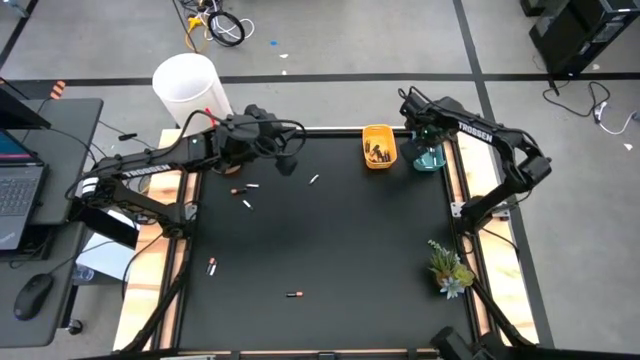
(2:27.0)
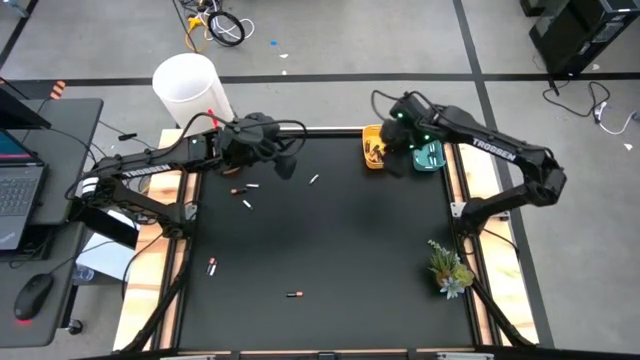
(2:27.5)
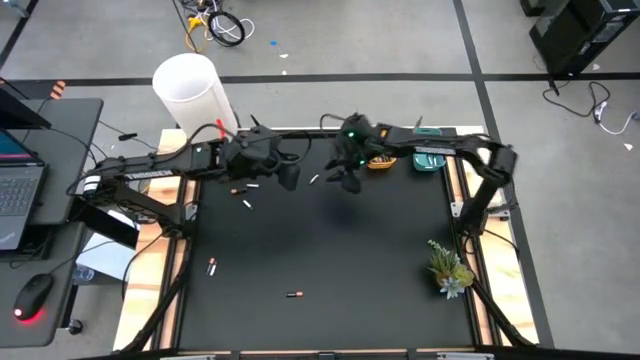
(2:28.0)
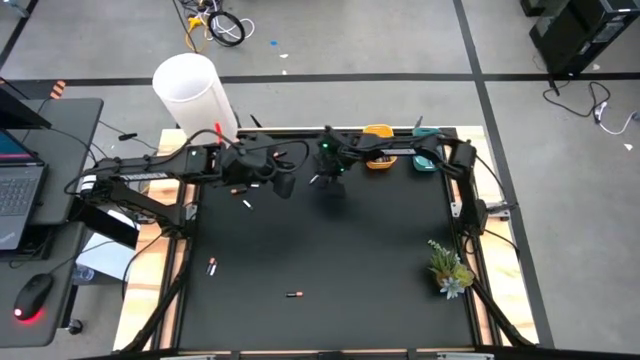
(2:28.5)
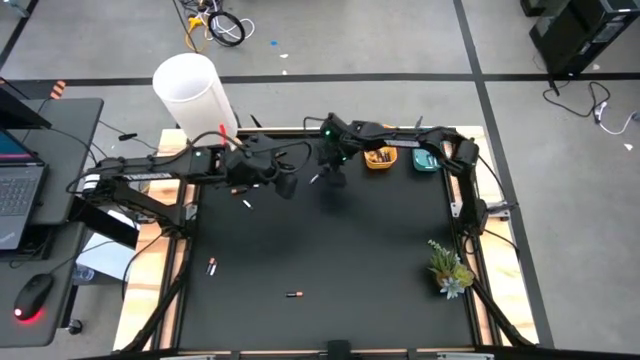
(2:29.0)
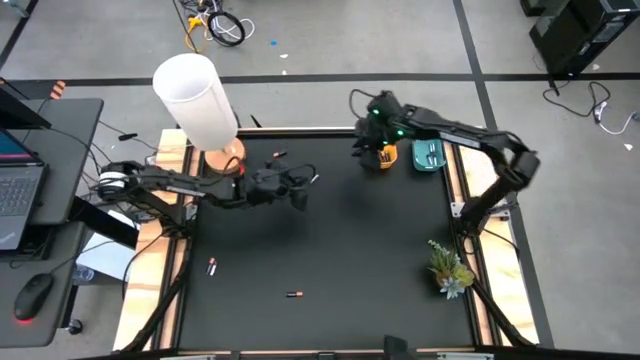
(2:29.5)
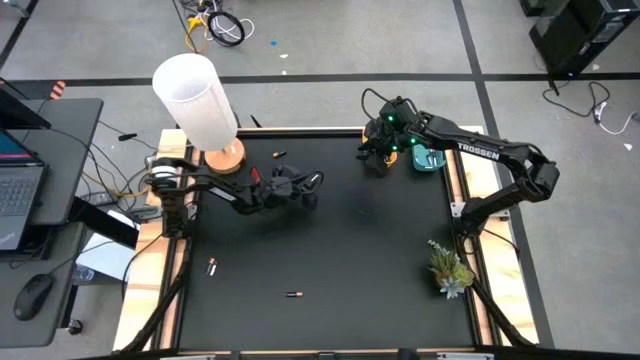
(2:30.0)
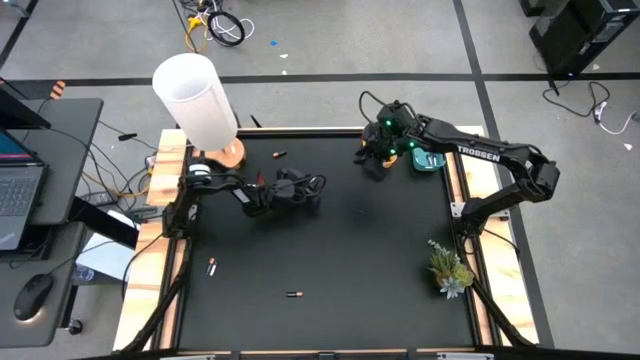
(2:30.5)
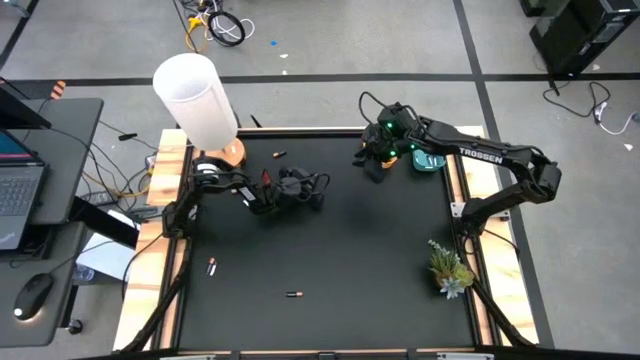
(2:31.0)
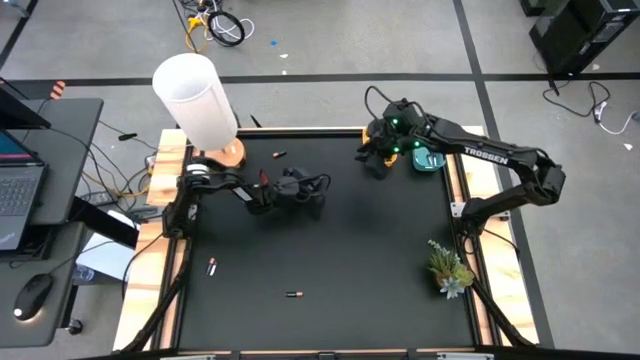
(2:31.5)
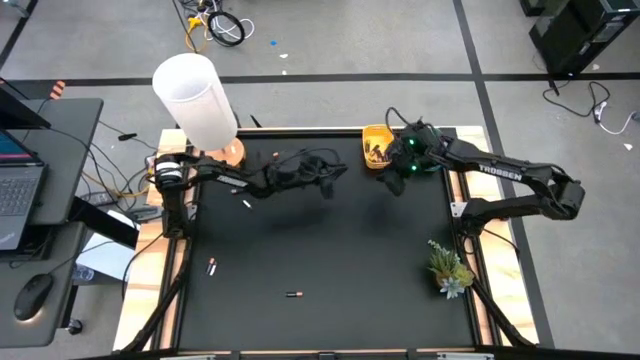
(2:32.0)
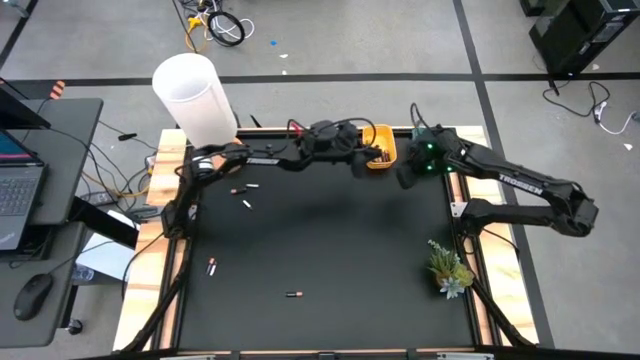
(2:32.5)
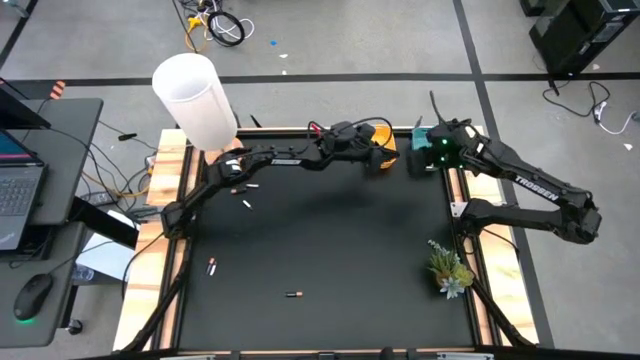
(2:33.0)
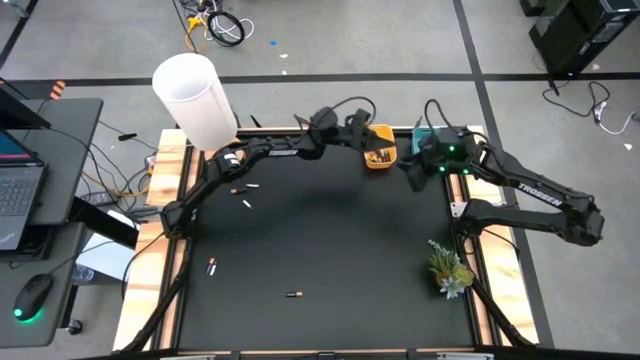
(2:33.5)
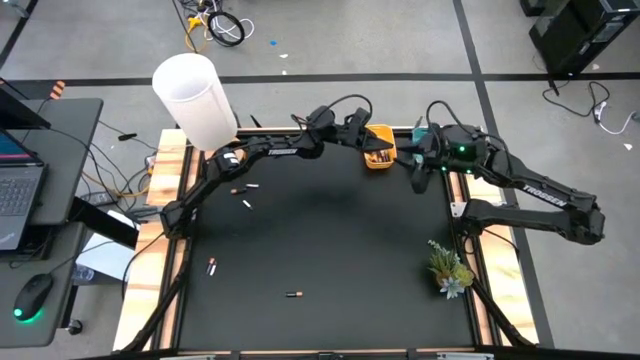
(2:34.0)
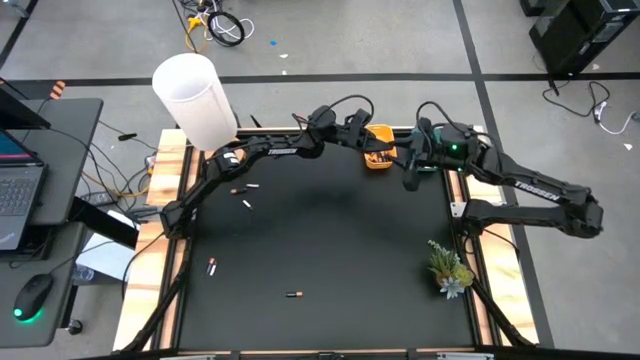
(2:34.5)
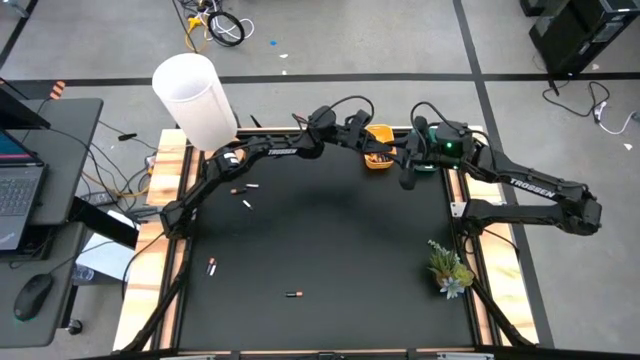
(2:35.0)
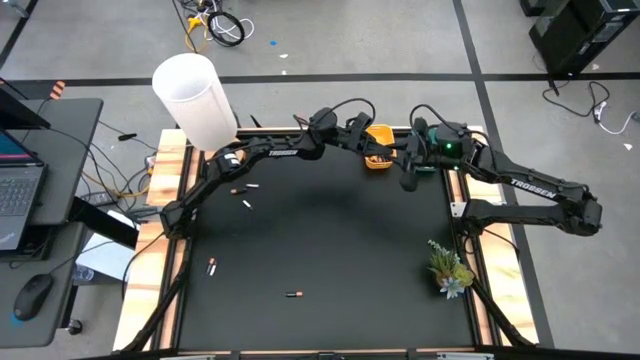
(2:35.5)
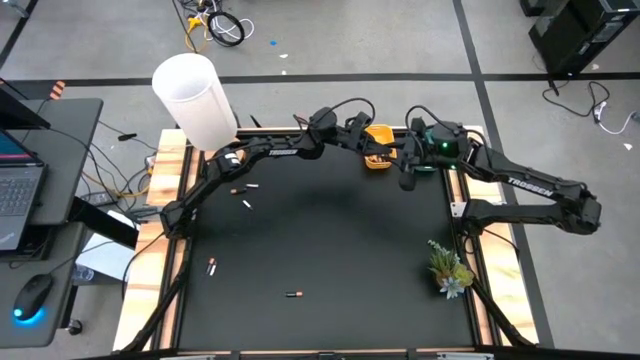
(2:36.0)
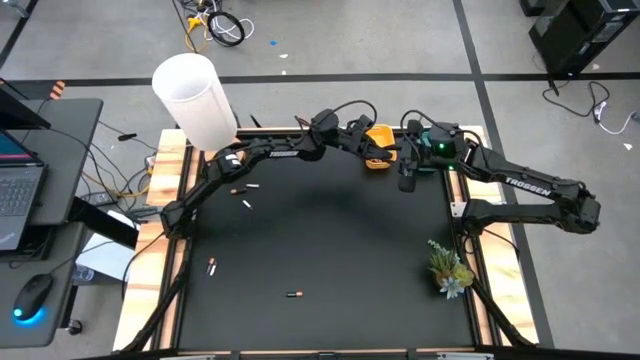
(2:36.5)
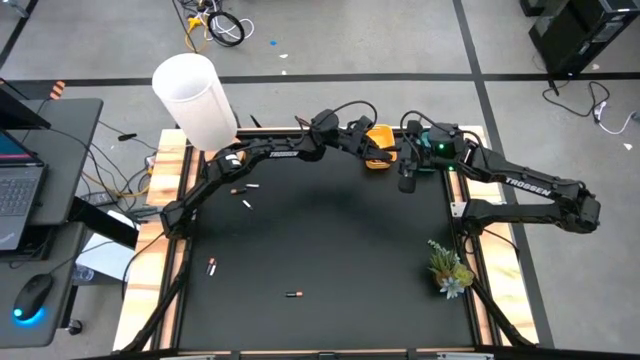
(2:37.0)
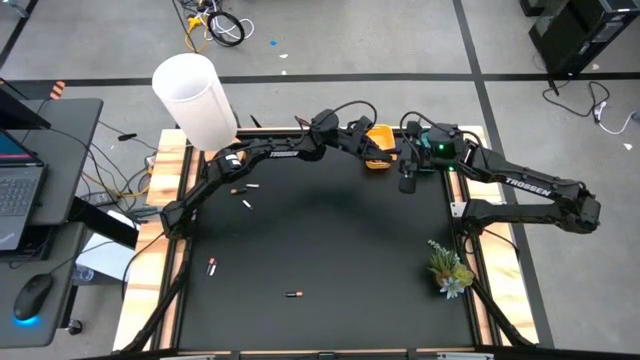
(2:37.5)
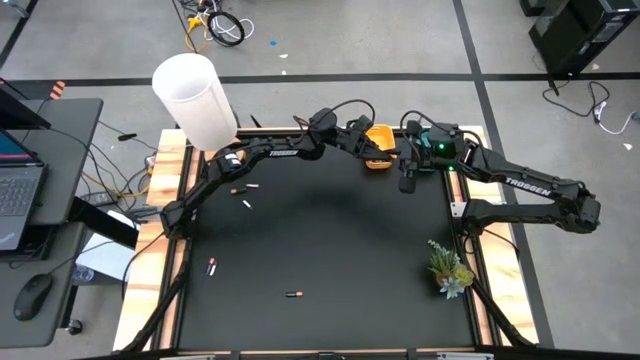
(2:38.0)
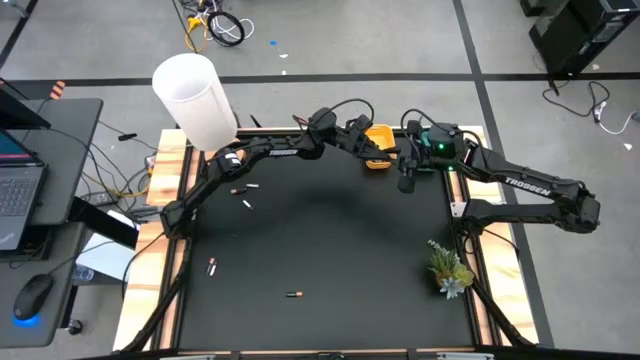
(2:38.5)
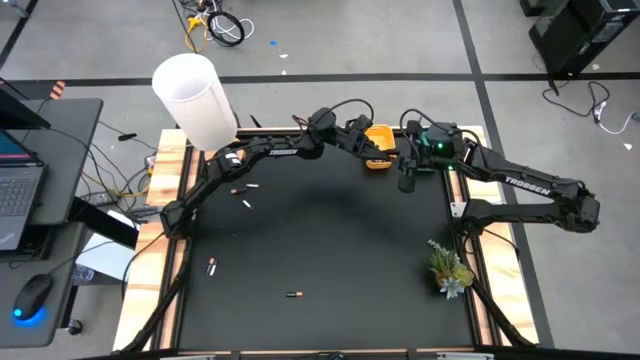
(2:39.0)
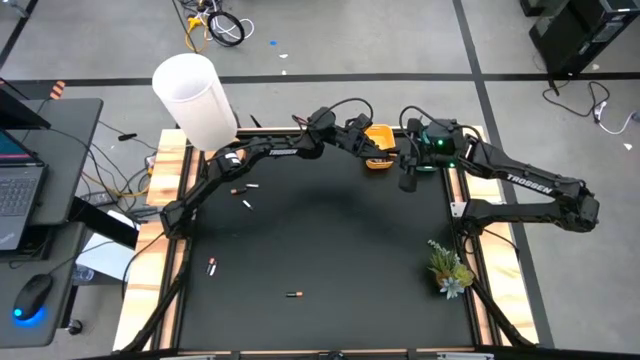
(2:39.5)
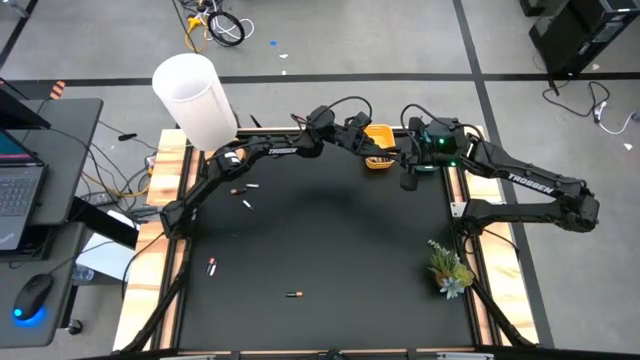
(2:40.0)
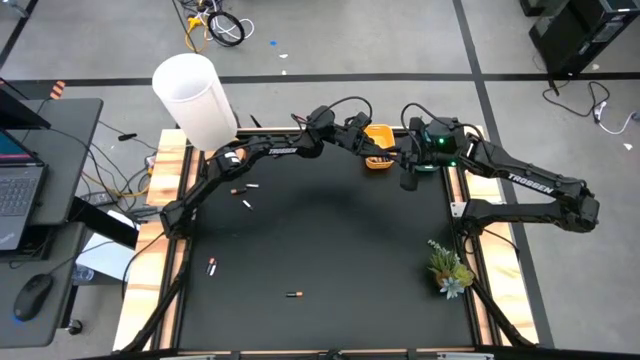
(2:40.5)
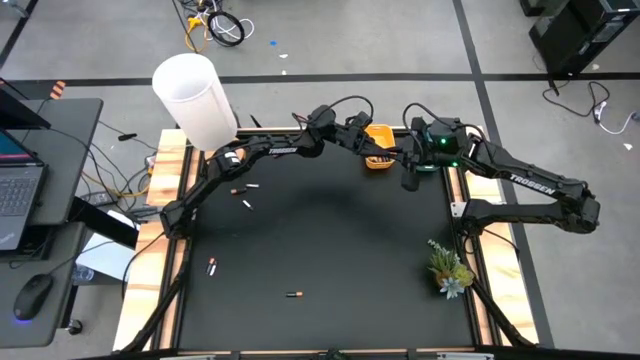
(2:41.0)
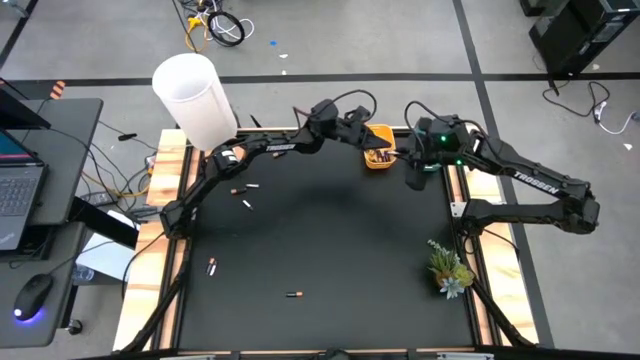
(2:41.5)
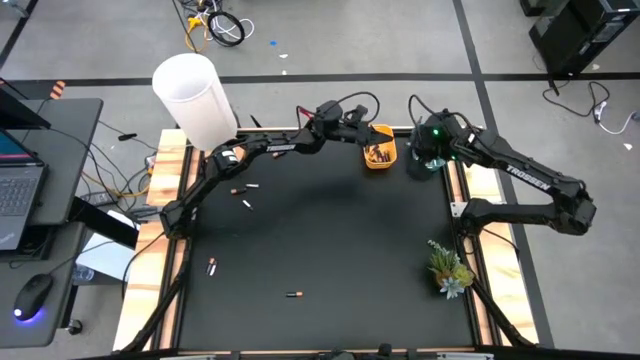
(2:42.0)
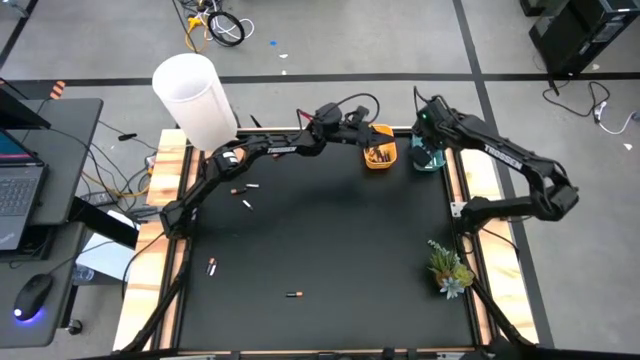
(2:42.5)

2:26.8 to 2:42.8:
Task: Sort batteries
Put the silver battery into the blue bin

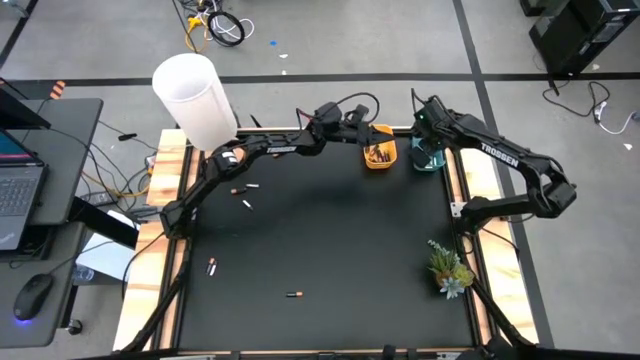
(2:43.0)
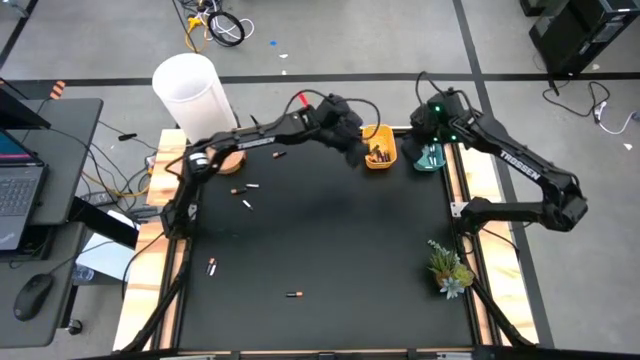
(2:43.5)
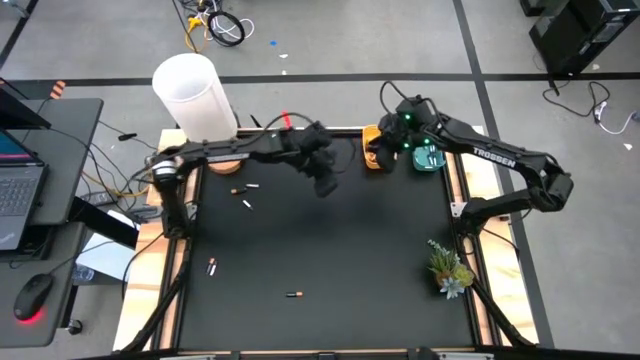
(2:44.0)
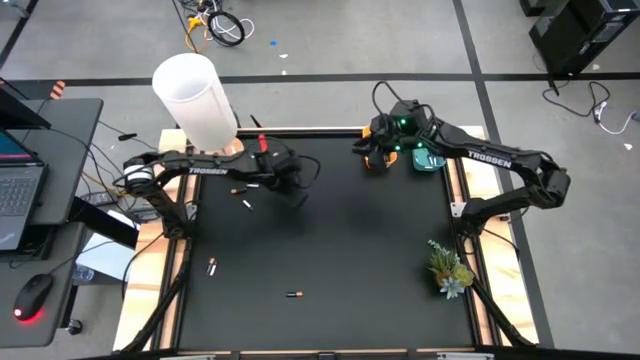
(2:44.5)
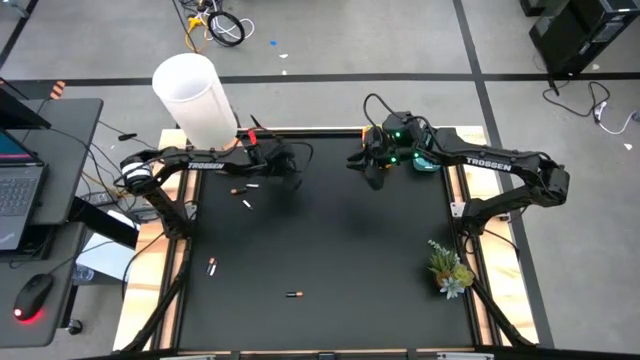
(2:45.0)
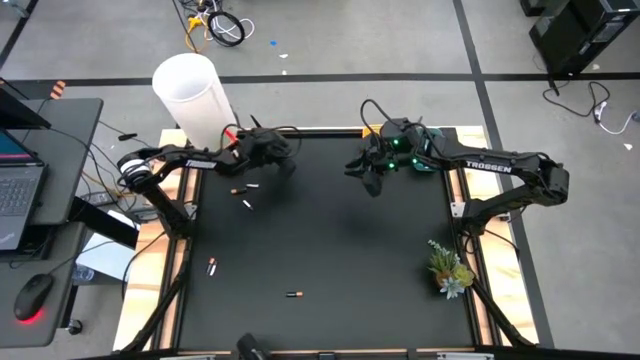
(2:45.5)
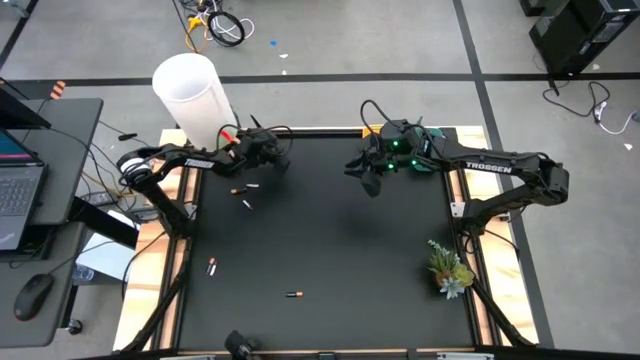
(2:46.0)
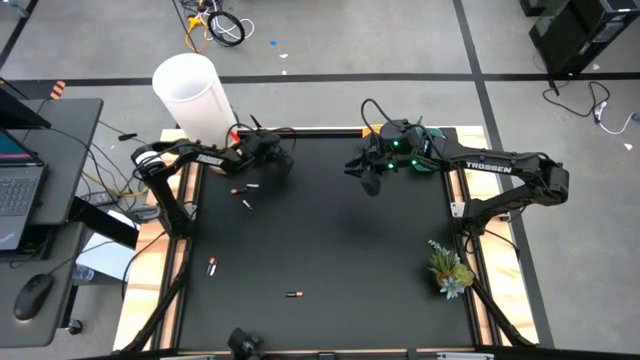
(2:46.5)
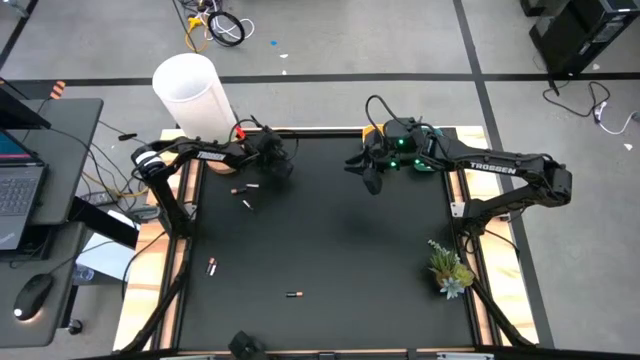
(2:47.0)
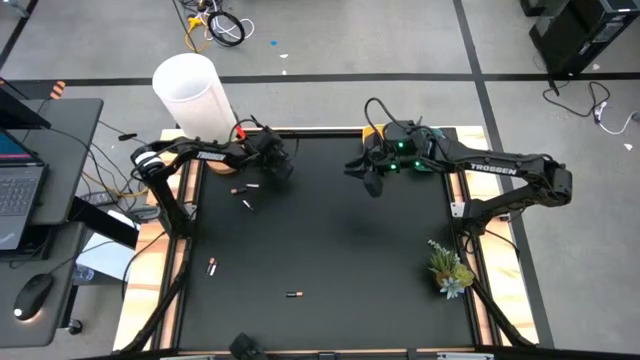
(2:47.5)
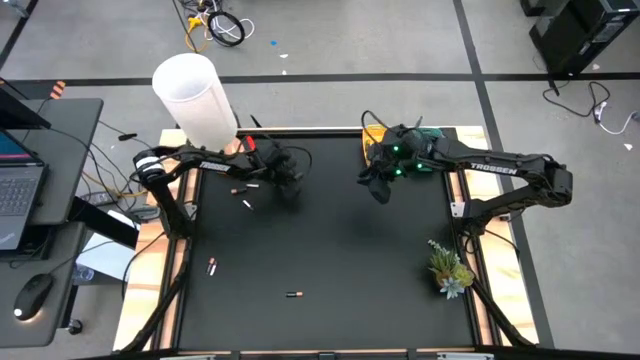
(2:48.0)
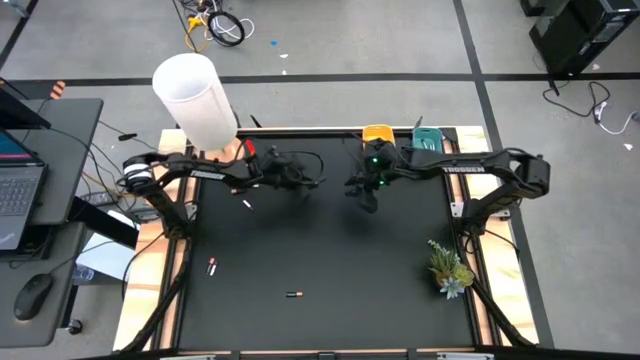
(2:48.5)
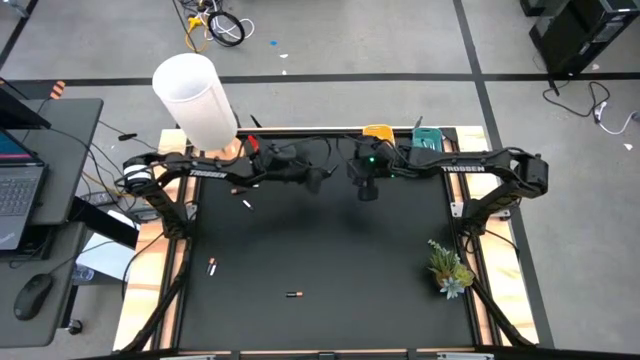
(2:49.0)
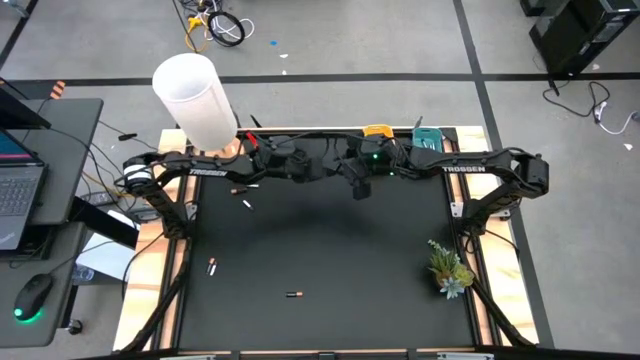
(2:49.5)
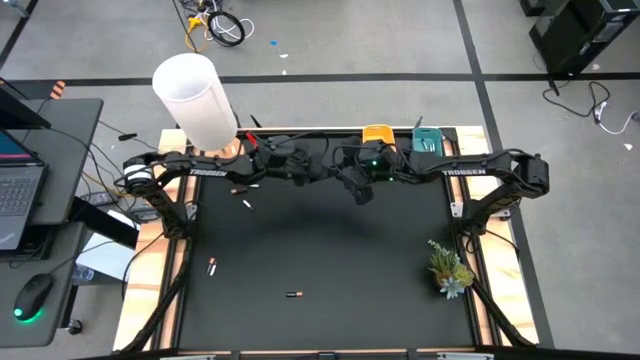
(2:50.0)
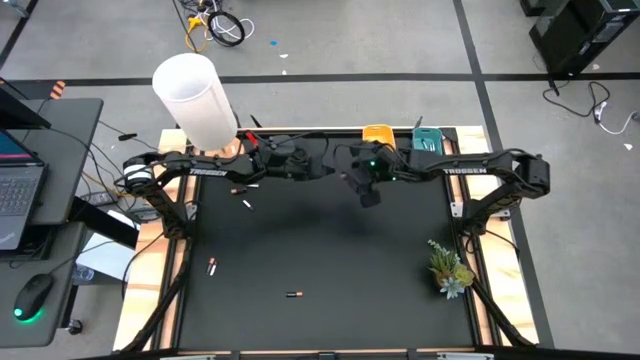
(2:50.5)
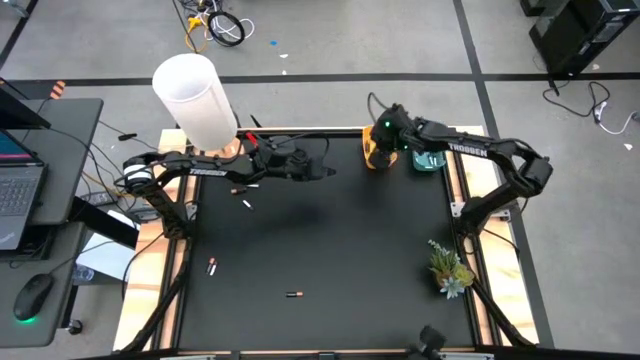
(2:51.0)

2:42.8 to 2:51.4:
Put the black battery into the yellow bin
